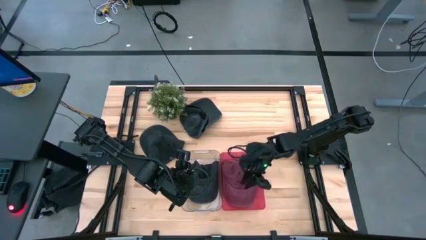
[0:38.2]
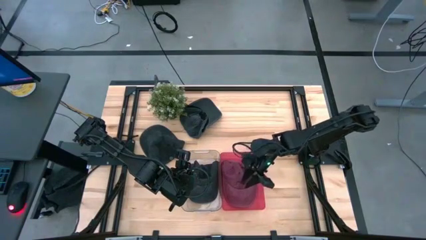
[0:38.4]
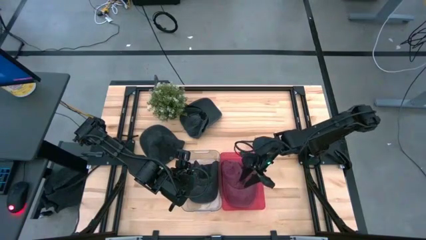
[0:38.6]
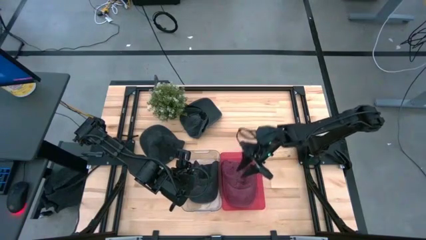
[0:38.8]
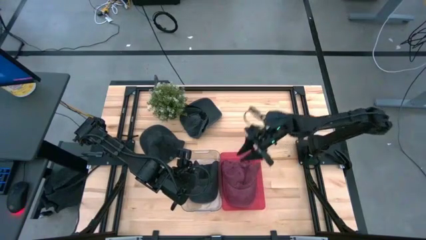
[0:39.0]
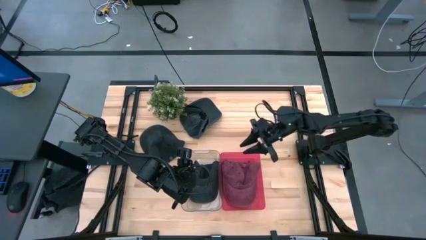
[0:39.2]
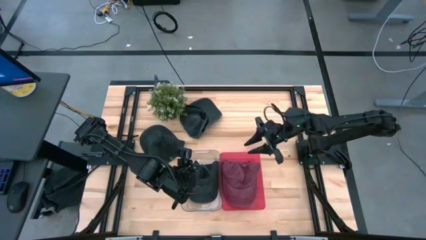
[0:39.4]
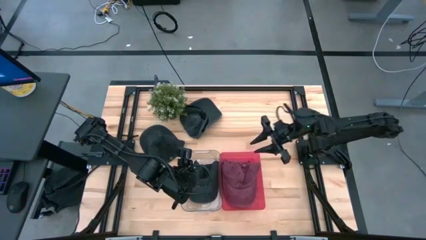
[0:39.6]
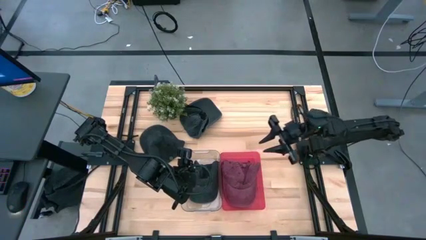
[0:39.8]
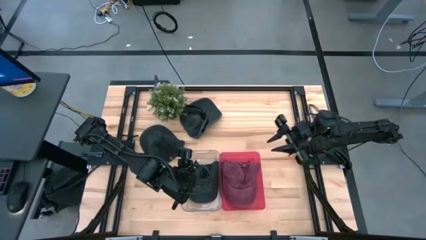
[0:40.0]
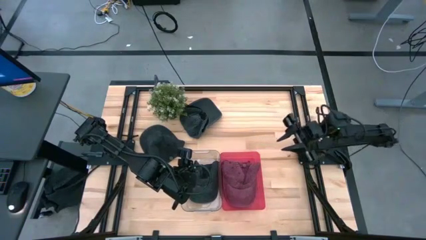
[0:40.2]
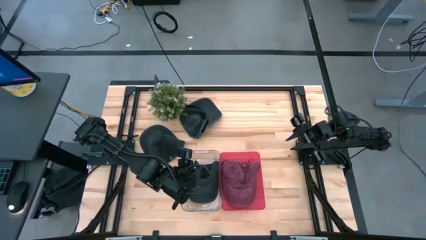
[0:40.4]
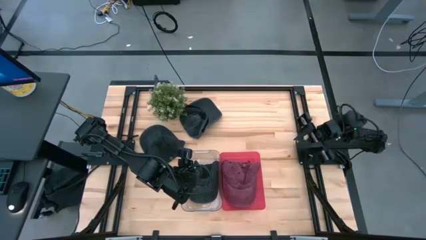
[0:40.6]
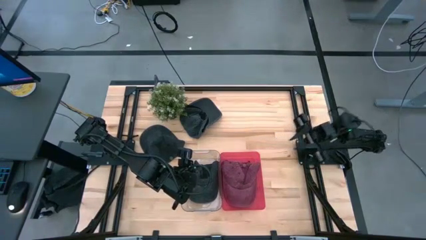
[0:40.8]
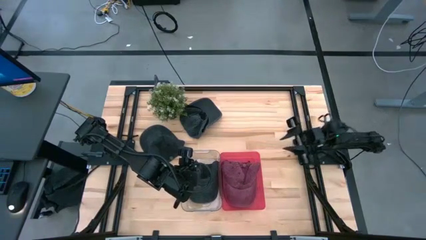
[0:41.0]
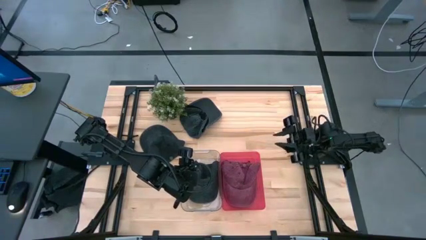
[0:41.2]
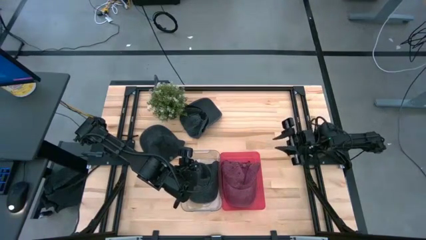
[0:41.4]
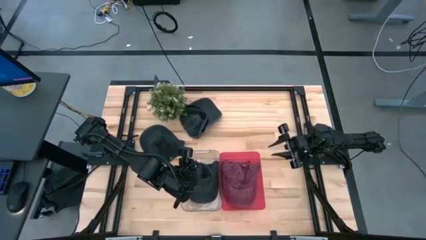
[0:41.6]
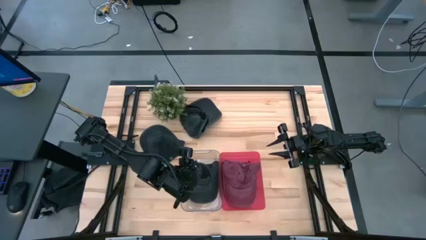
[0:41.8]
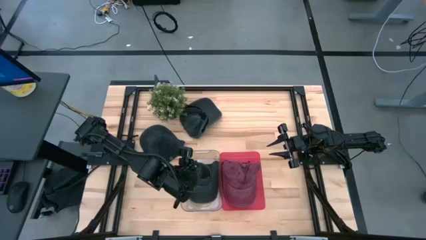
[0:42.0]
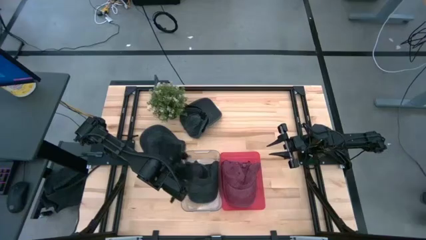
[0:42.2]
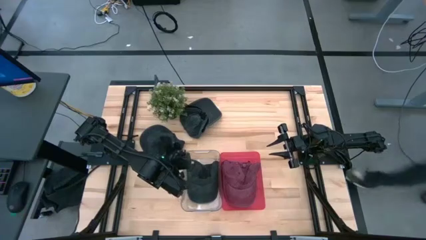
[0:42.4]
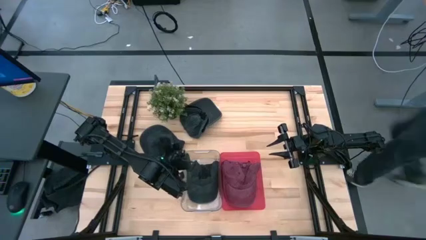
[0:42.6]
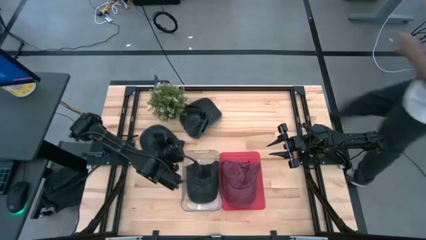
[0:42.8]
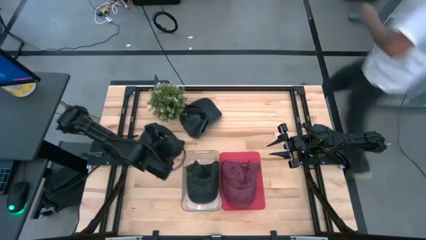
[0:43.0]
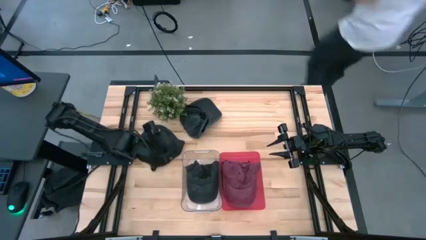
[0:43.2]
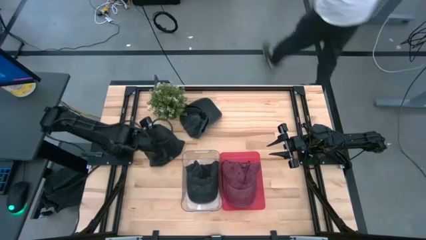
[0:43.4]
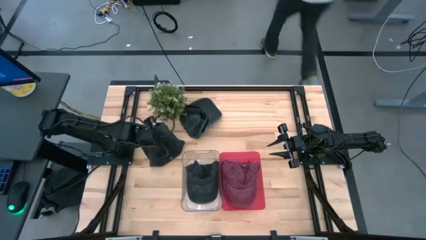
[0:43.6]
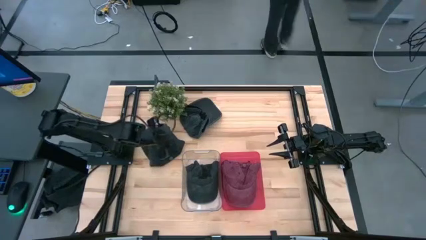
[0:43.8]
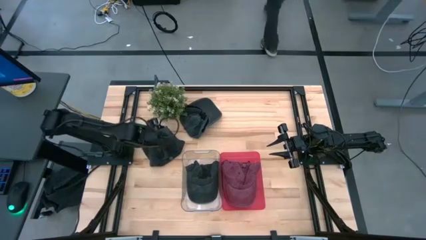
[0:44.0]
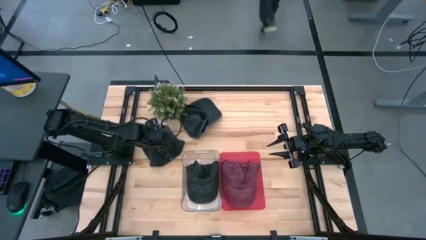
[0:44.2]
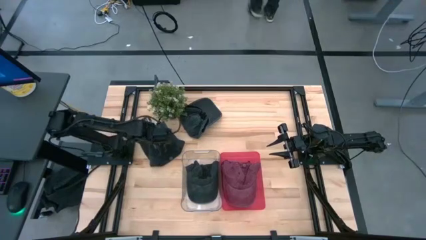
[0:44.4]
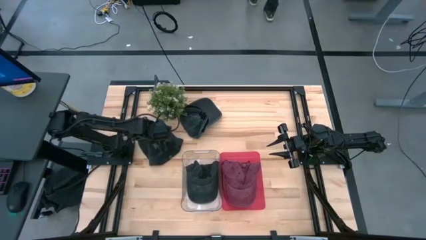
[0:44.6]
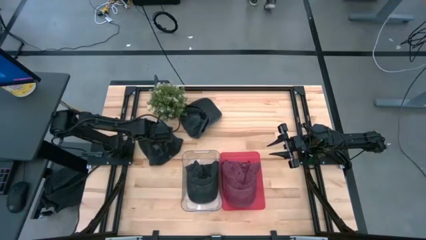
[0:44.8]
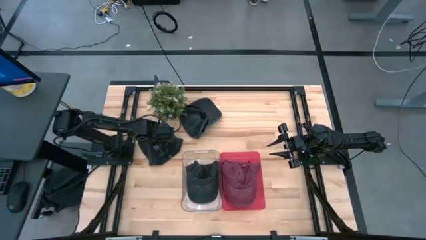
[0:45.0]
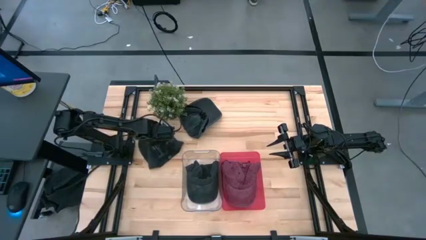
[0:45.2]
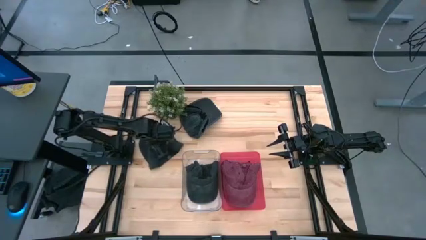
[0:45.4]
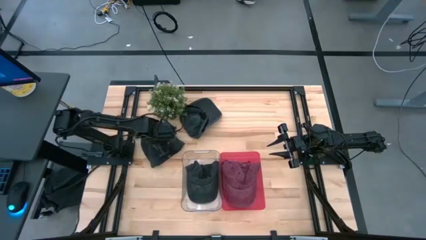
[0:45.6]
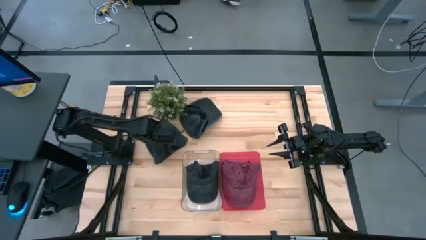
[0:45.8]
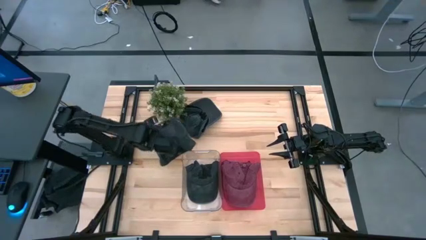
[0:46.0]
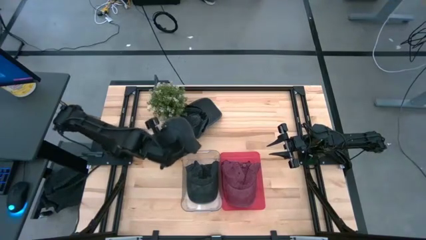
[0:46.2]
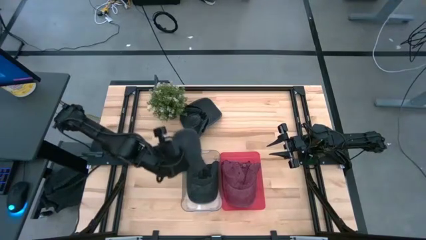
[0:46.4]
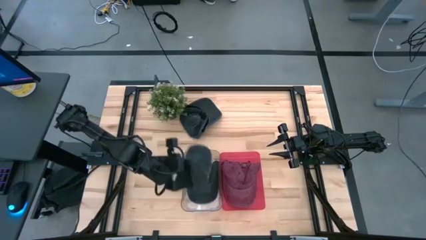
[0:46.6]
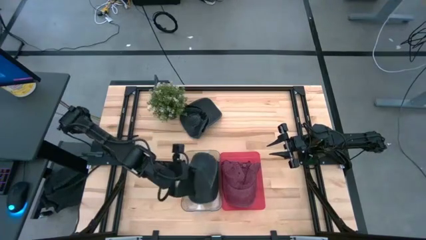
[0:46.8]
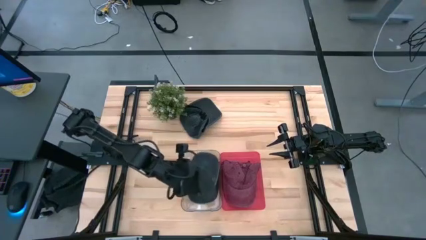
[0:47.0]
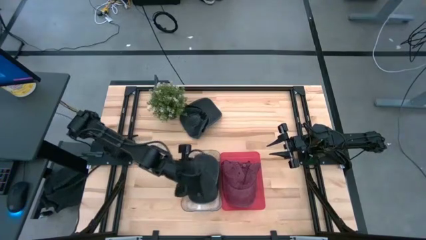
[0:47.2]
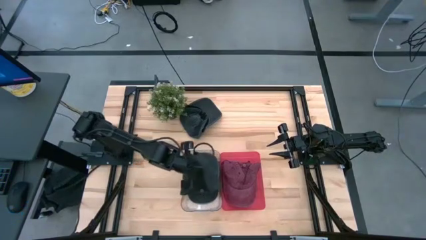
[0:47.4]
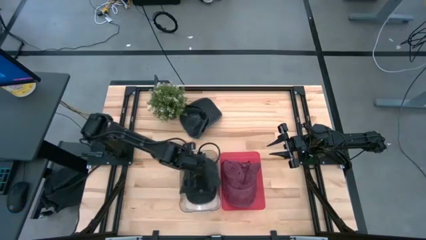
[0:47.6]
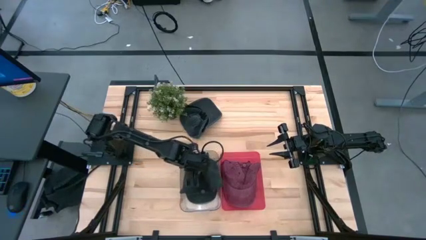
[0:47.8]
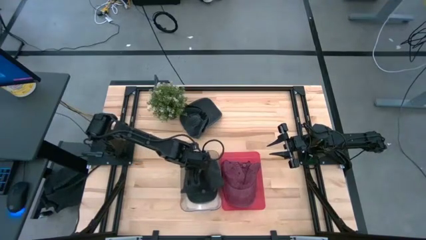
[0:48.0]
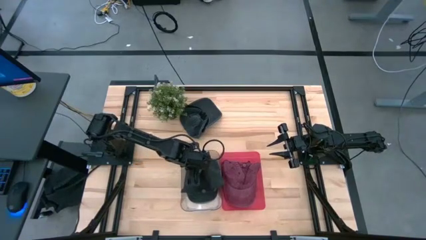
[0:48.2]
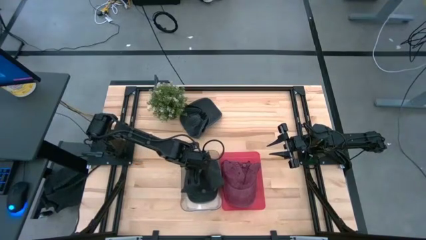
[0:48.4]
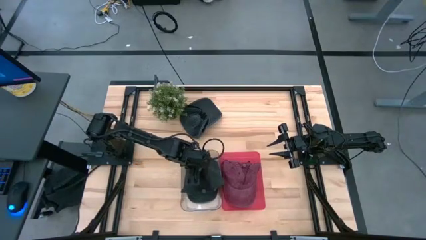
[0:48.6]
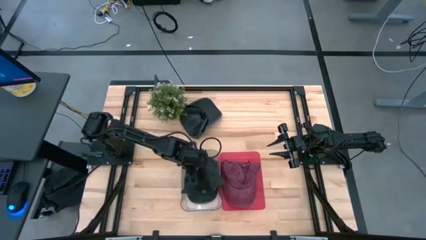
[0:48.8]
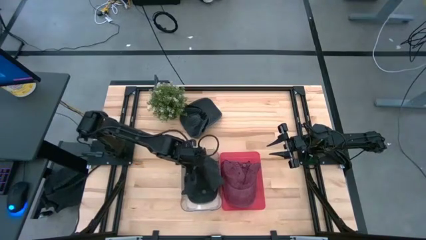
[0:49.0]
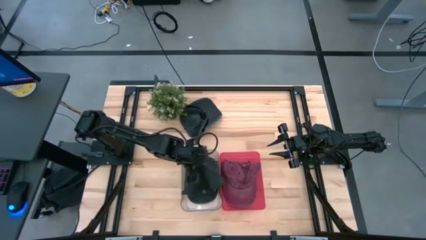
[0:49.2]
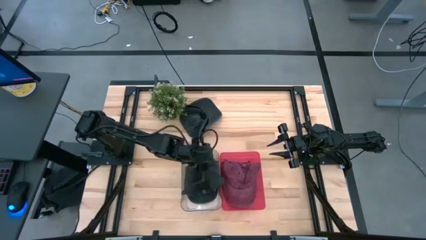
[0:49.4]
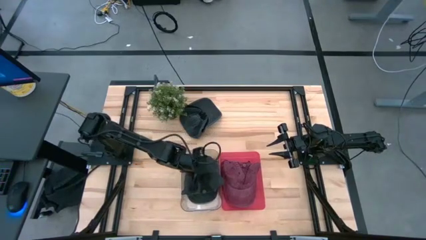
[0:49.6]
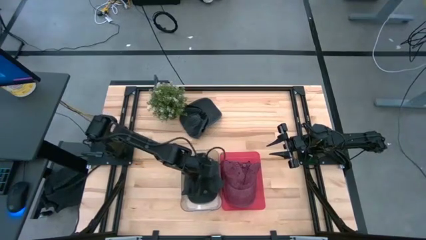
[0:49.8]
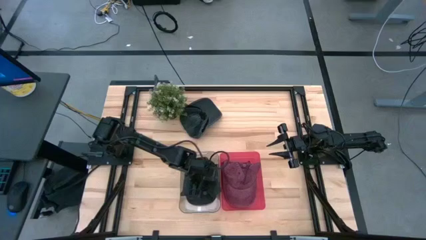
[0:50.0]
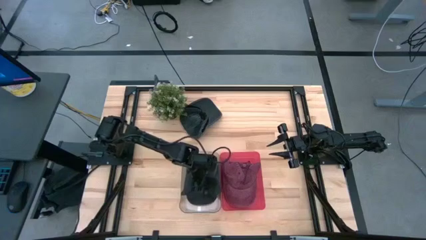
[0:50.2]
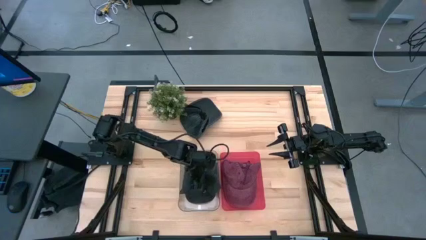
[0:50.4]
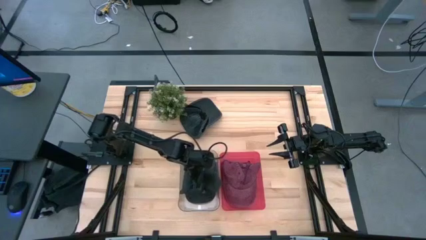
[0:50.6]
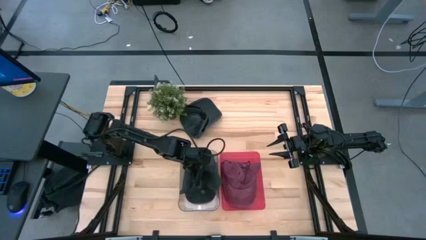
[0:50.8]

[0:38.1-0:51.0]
Task: Pick & Place hat
Put the bottom black cap into the transparent bin
